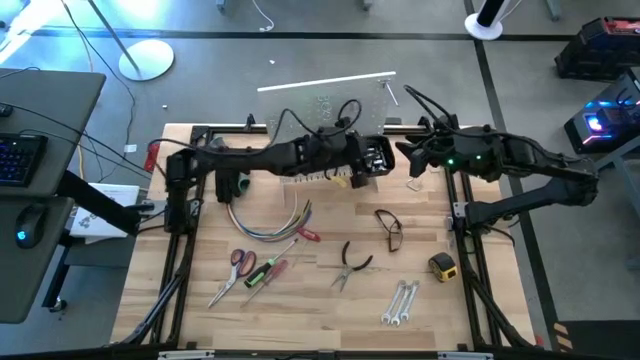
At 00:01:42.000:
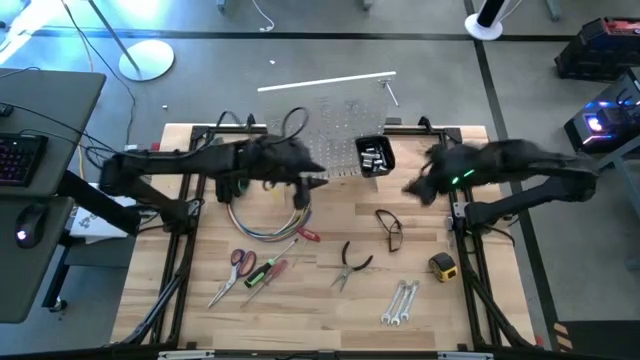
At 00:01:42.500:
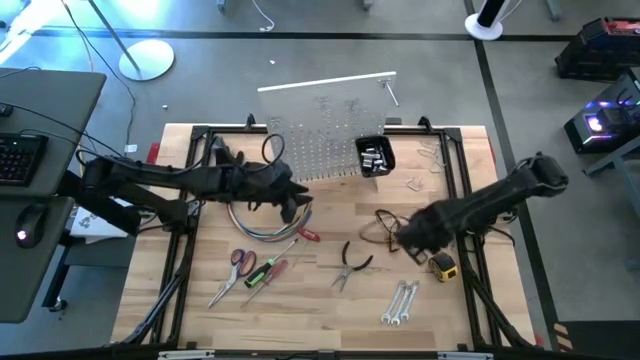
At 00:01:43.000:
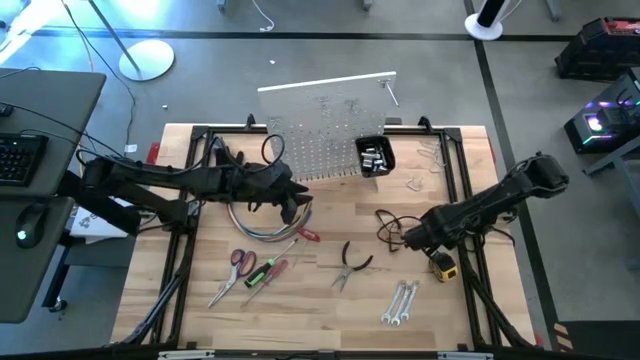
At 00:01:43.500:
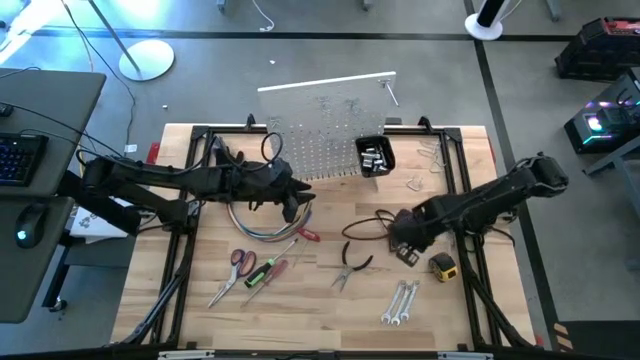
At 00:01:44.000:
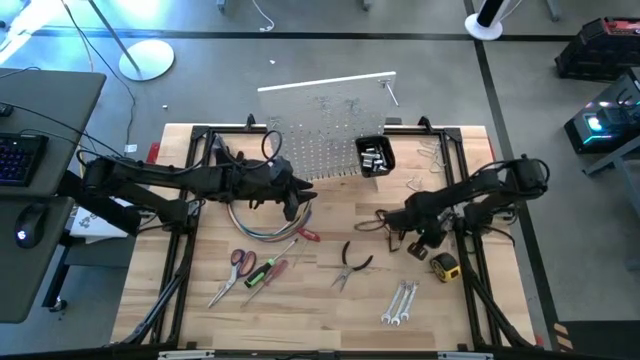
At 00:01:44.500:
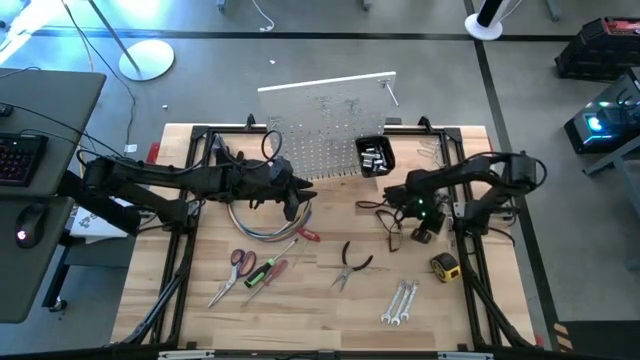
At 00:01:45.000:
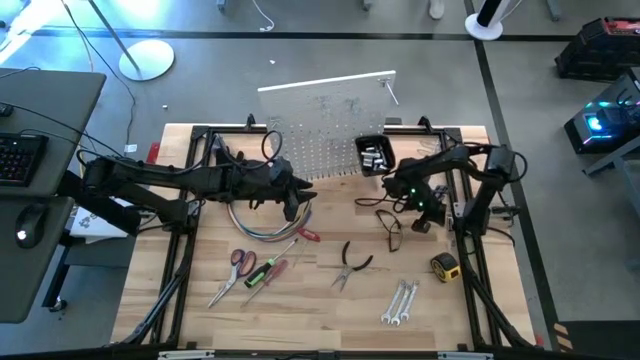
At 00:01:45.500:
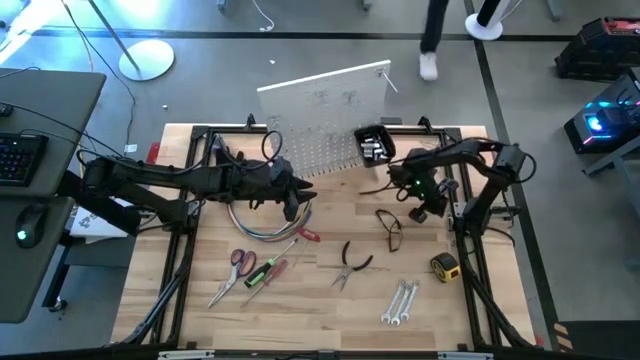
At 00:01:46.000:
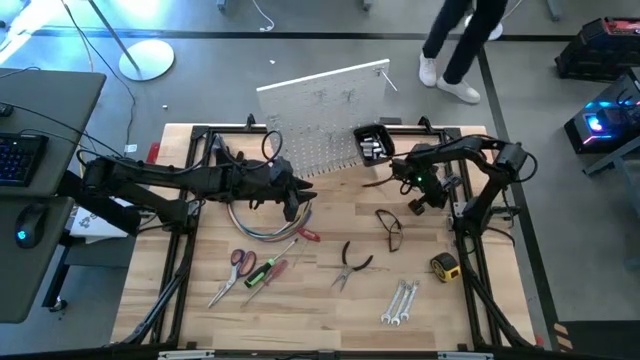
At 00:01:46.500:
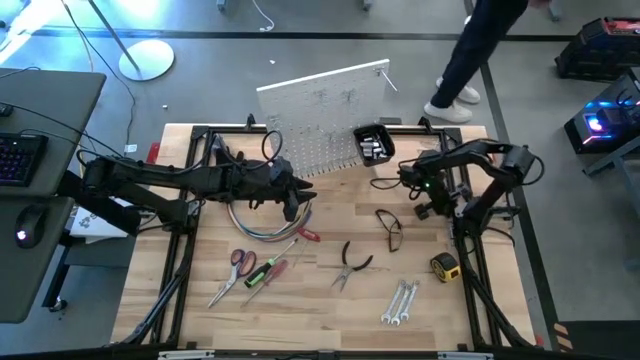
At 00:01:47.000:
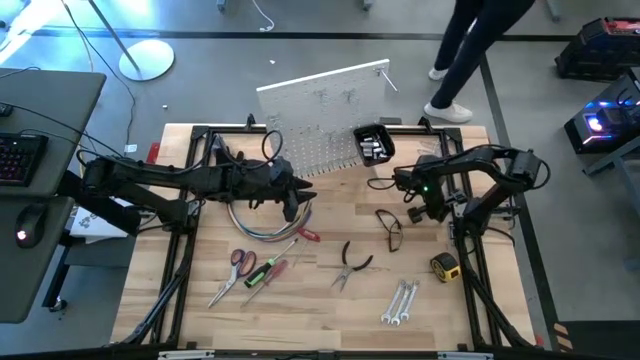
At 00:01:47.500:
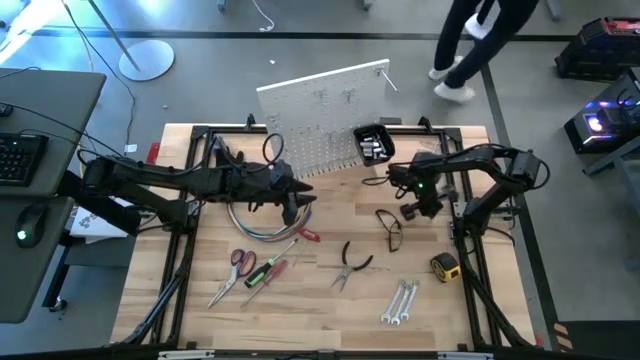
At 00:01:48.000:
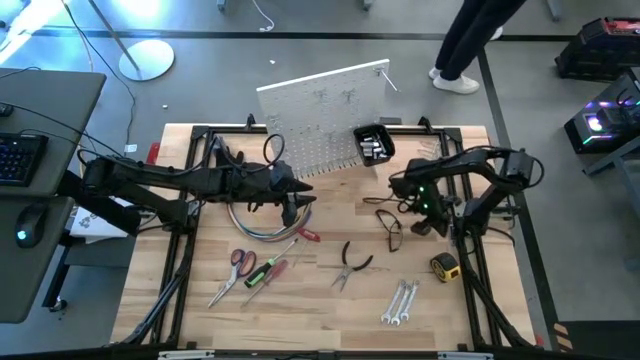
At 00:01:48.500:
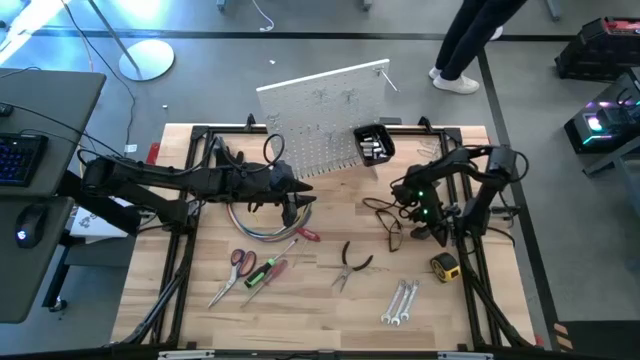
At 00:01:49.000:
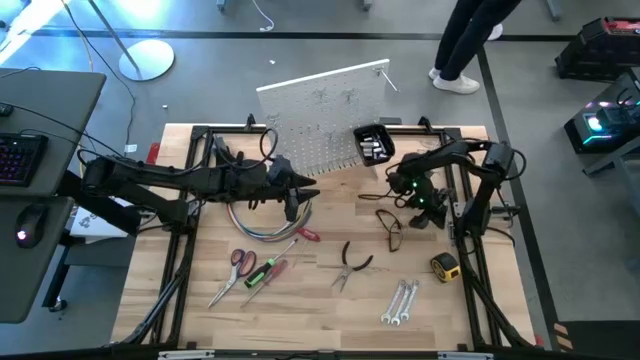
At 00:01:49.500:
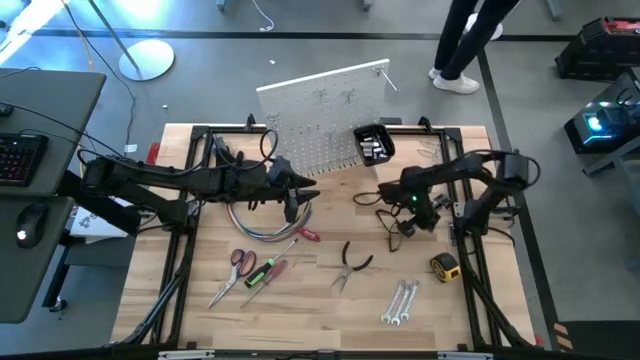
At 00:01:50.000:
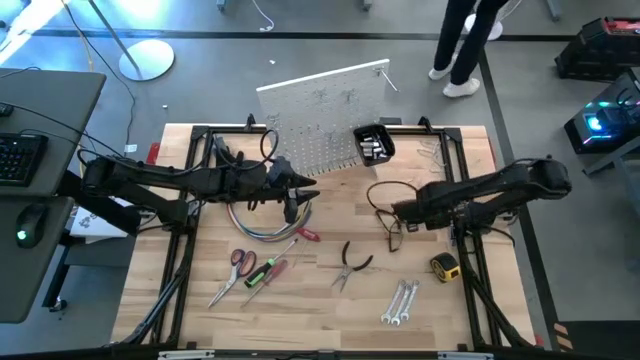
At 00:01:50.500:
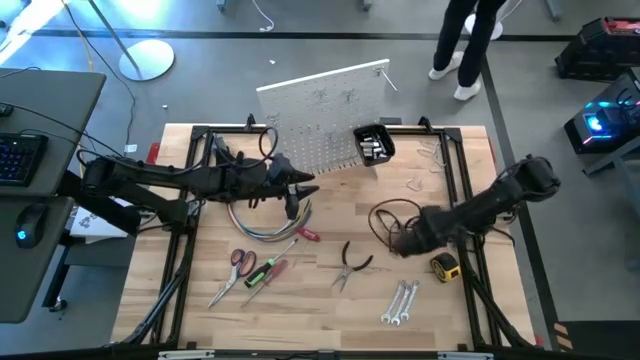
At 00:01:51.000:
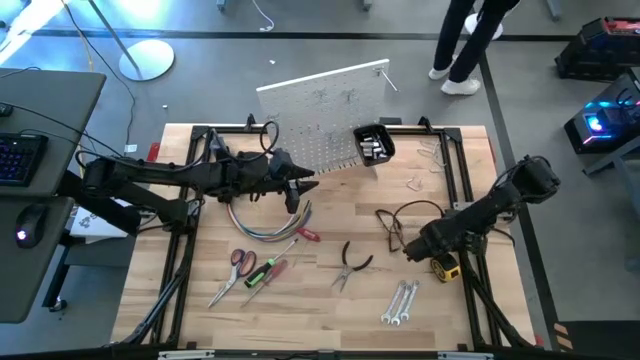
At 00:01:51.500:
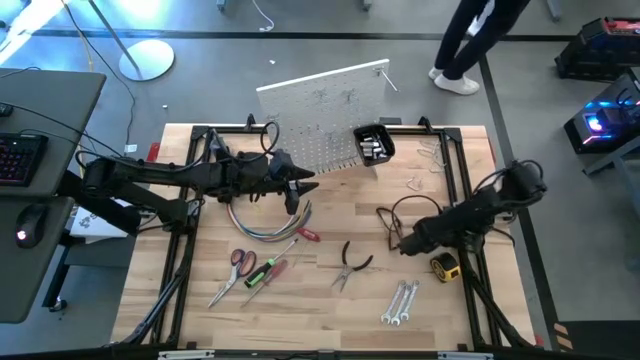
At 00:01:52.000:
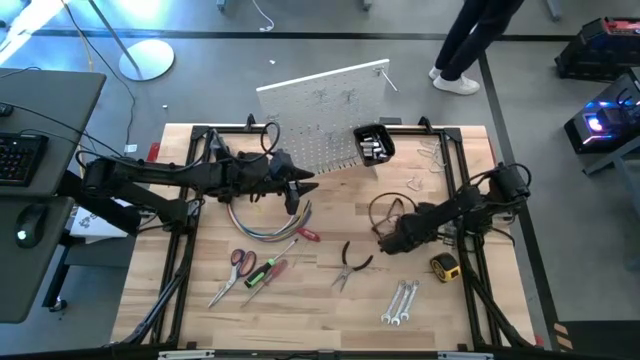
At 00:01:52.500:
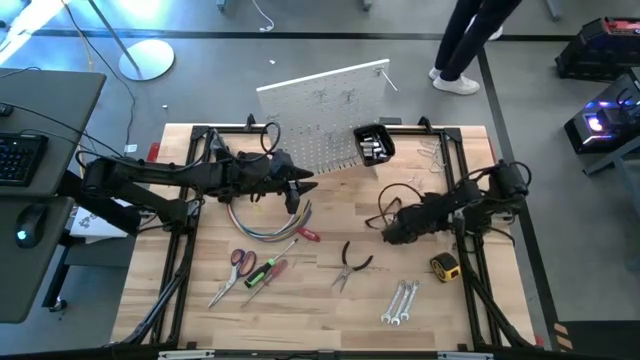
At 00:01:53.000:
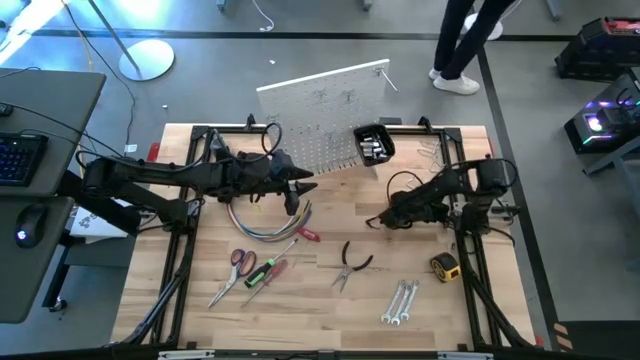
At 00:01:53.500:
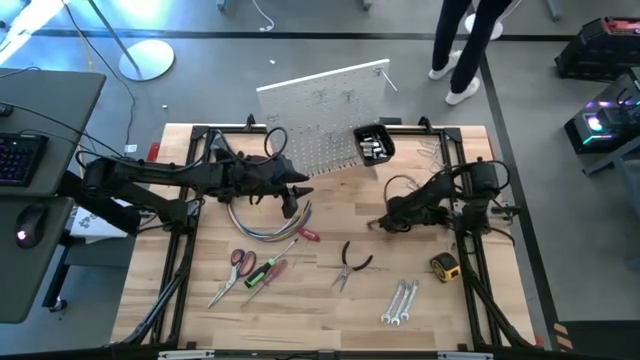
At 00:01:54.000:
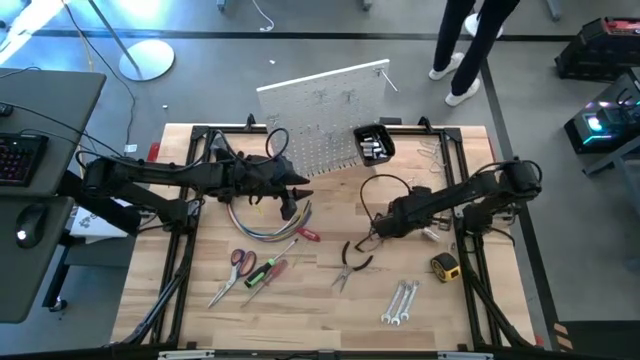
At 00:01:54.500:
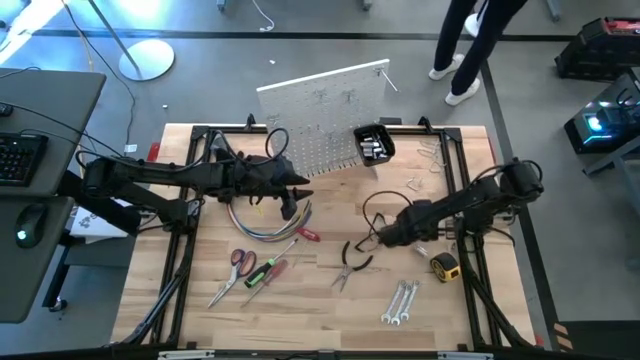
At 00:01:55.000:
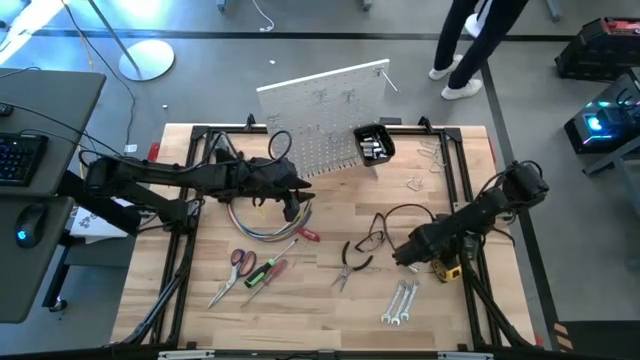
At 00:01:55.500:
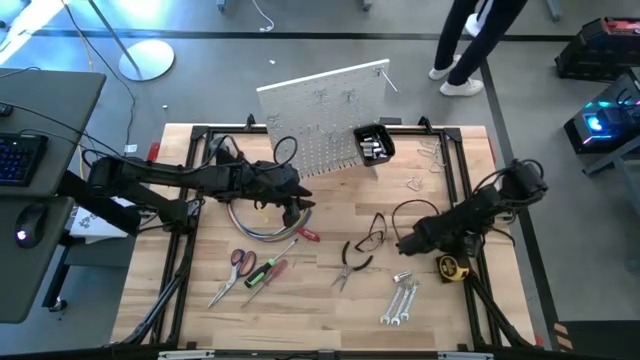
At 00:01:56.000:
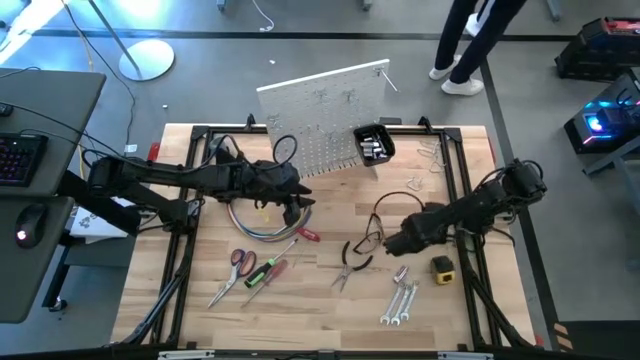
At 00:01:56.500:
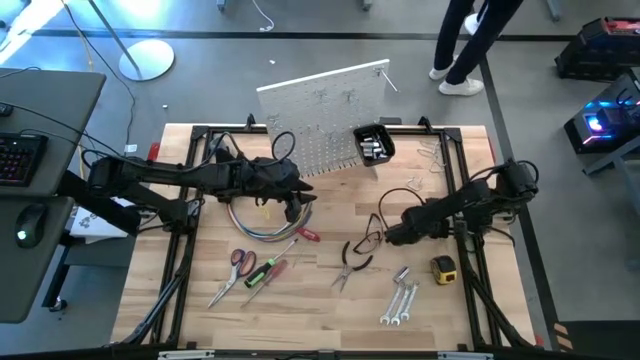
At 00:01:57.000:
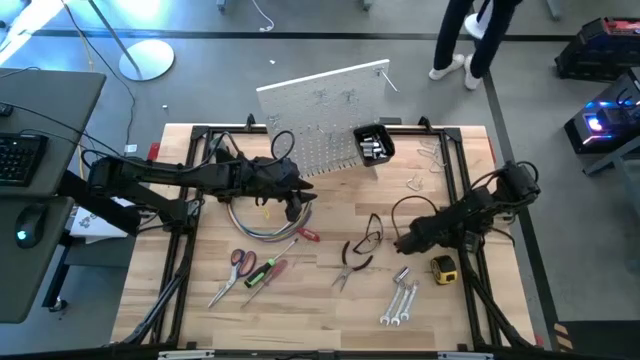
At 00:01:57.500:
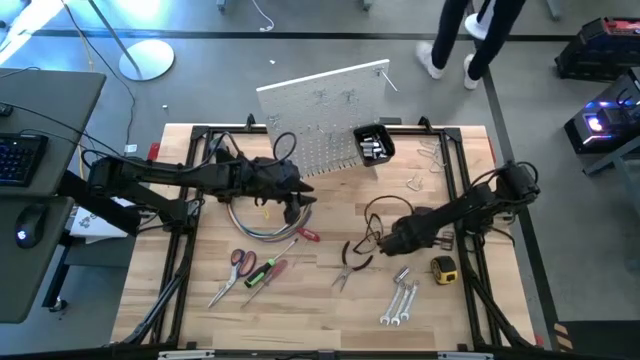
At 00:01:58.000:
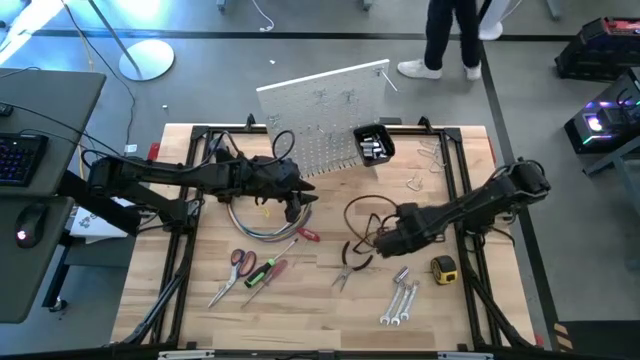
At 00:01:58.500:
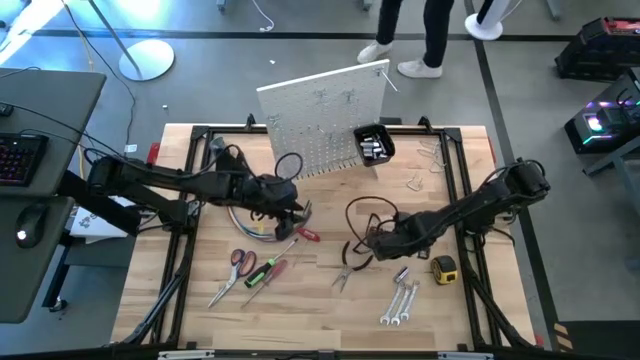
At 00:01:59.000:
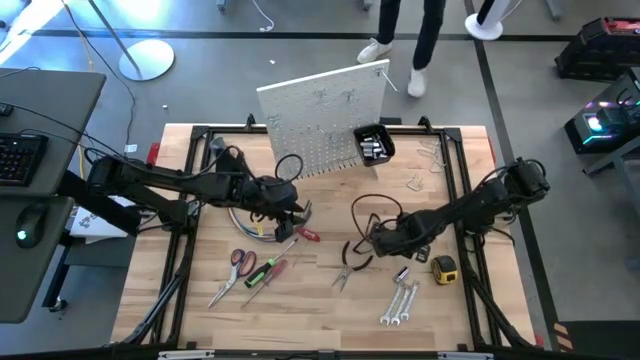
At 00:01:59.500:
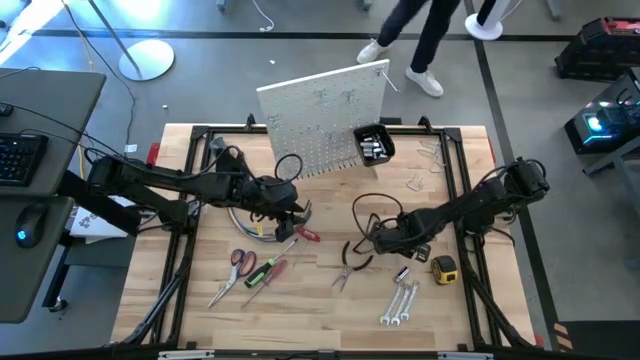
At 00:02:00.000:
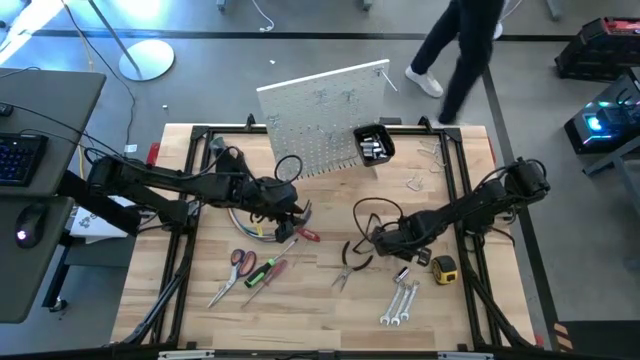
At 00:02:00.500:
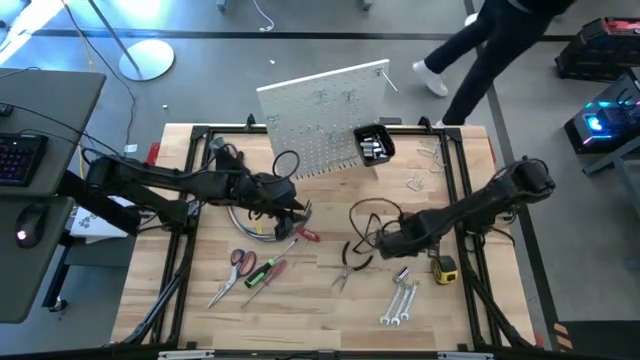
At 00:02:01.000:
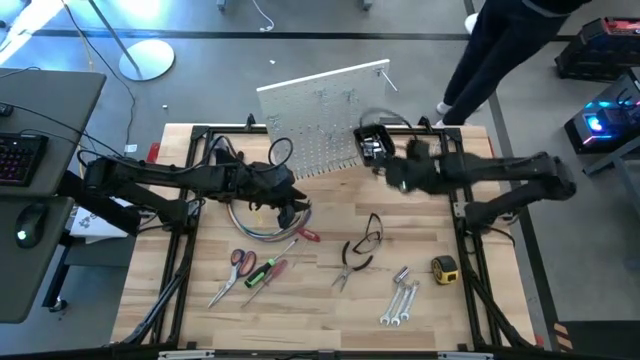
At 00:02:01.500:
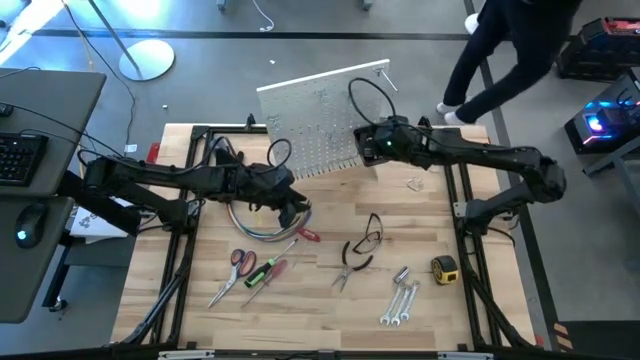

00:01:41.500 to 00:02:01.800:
Task: Hang tools onto peg board
Put the socket into the black bin on the peg board
